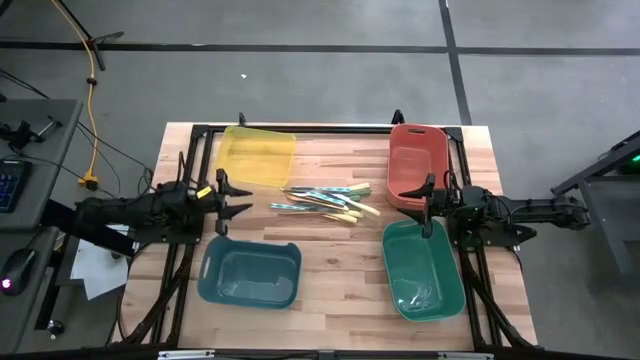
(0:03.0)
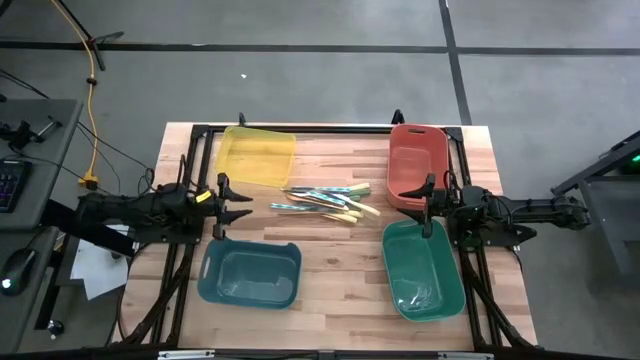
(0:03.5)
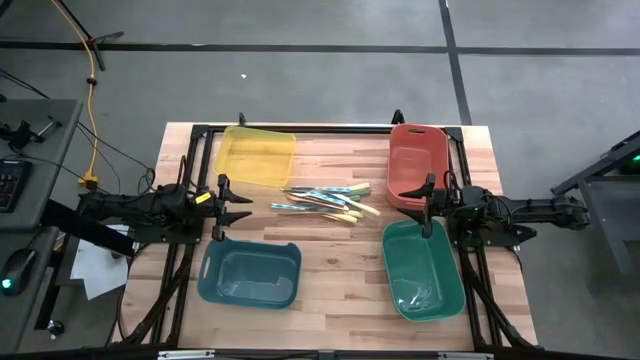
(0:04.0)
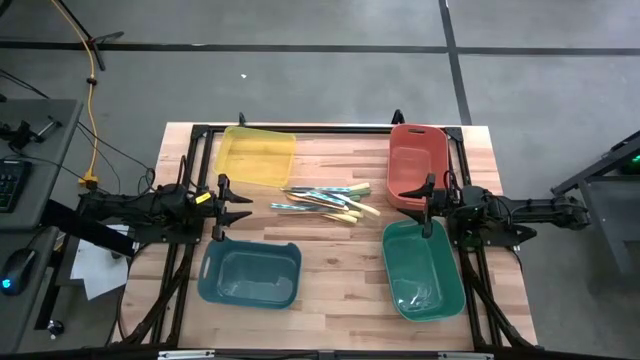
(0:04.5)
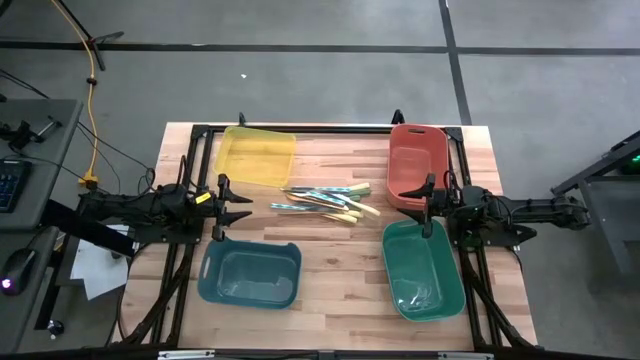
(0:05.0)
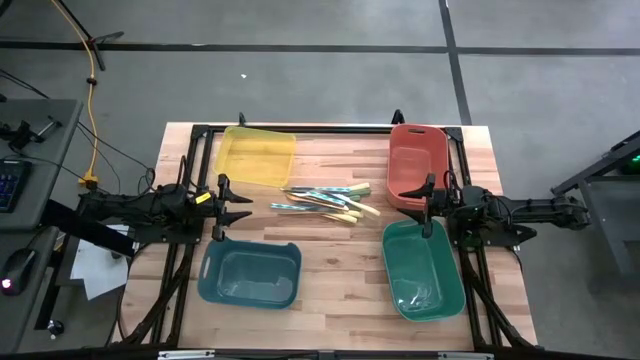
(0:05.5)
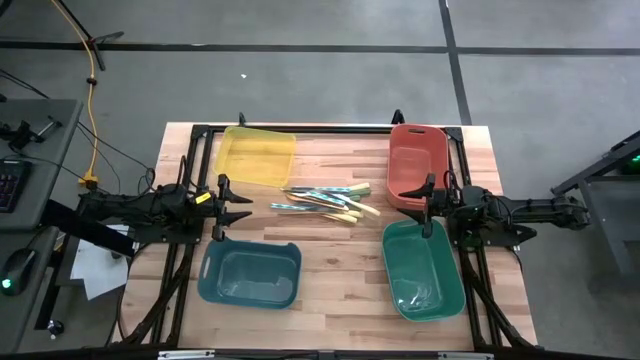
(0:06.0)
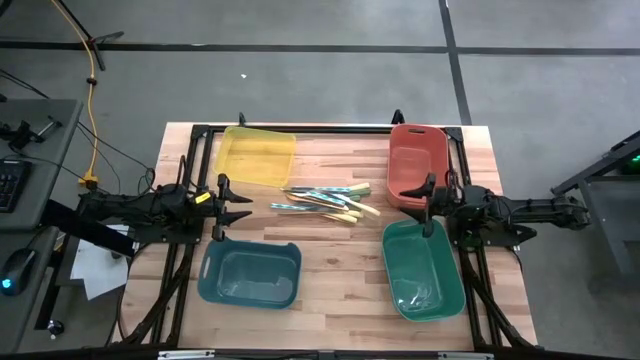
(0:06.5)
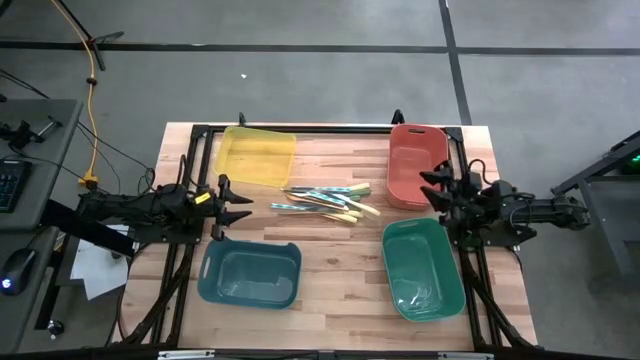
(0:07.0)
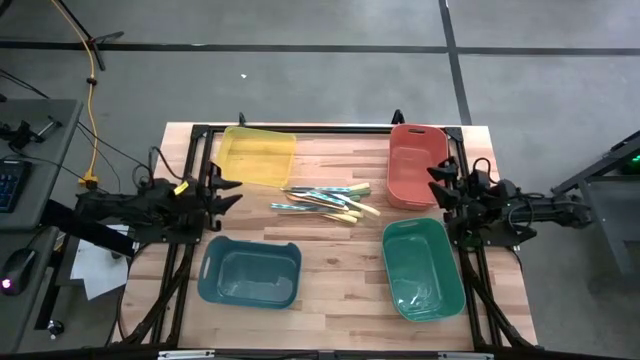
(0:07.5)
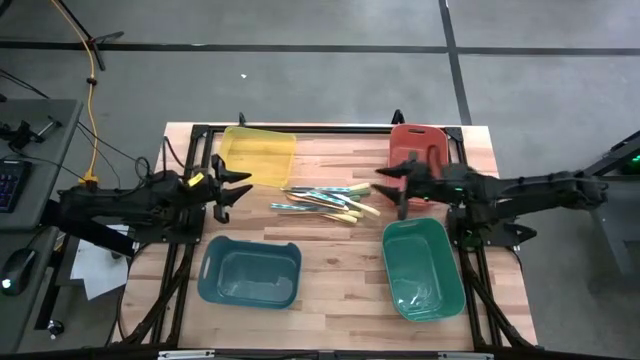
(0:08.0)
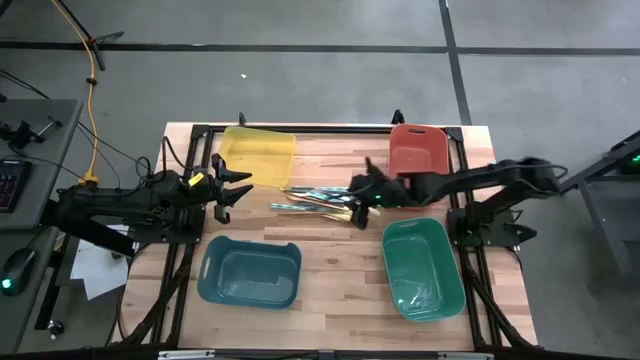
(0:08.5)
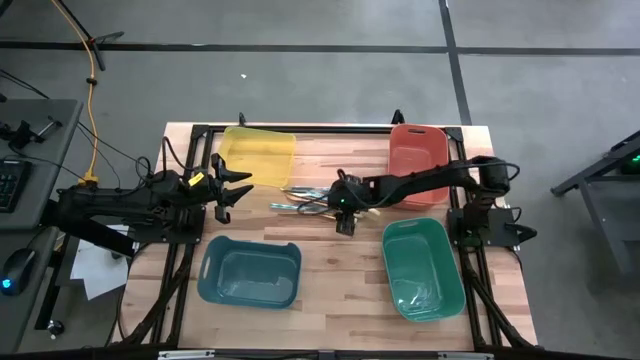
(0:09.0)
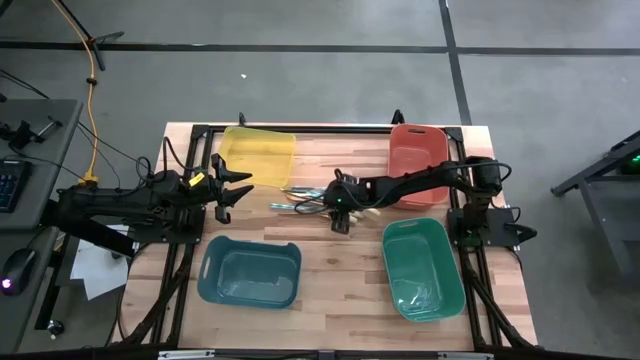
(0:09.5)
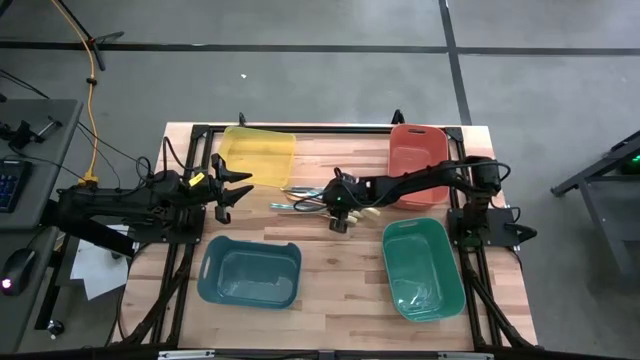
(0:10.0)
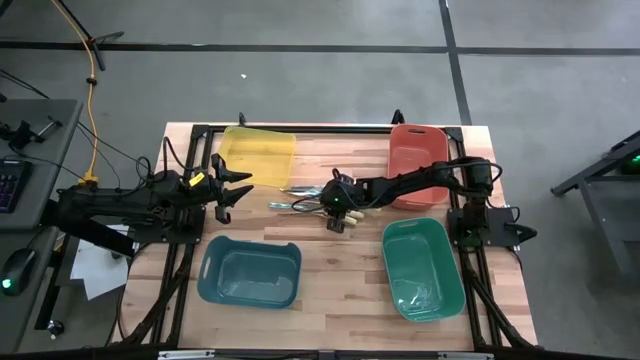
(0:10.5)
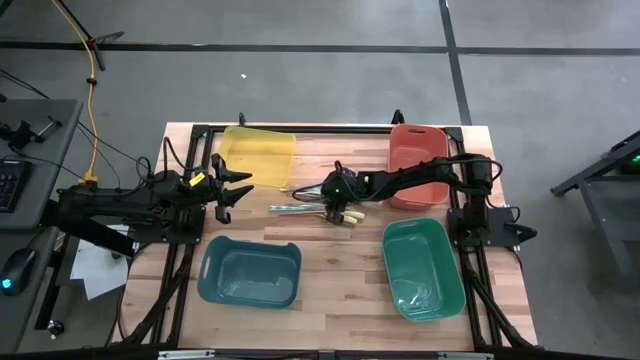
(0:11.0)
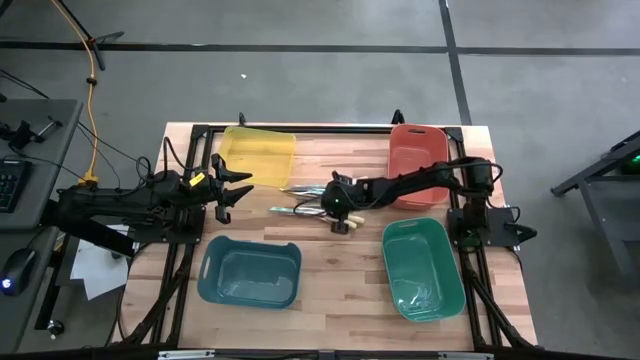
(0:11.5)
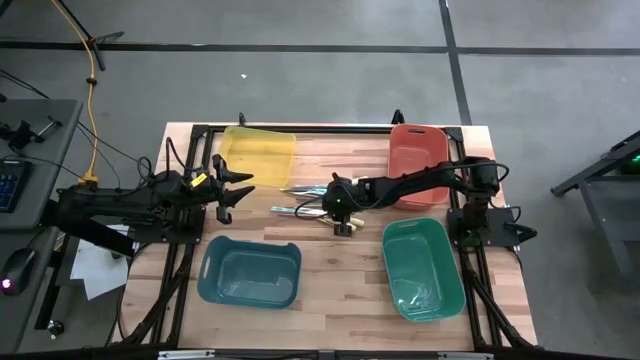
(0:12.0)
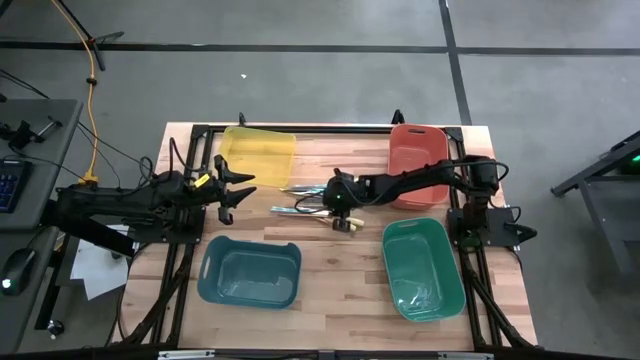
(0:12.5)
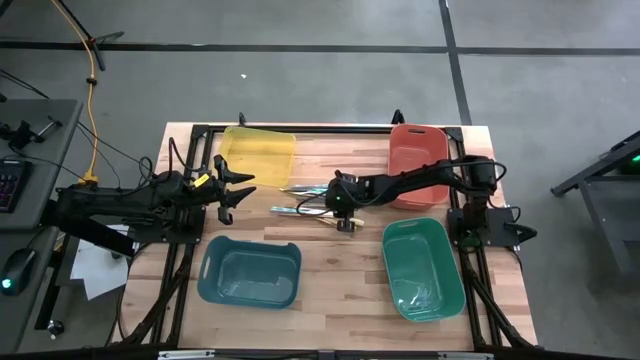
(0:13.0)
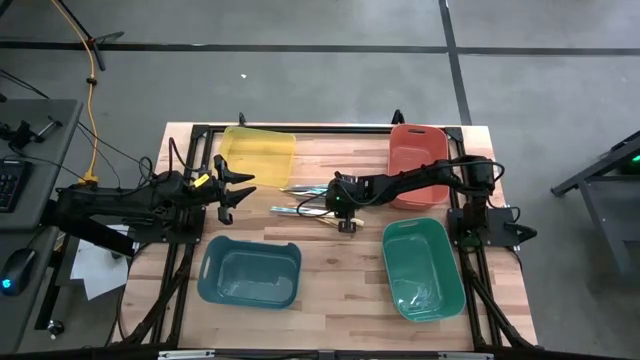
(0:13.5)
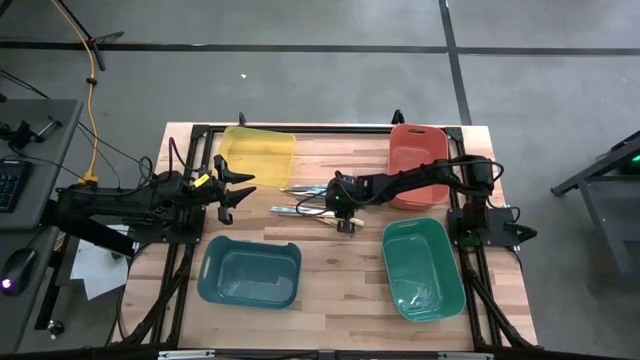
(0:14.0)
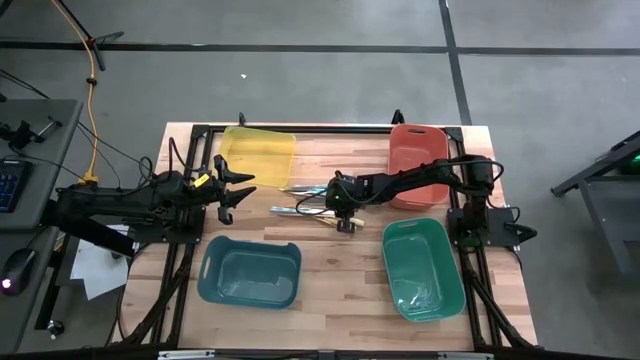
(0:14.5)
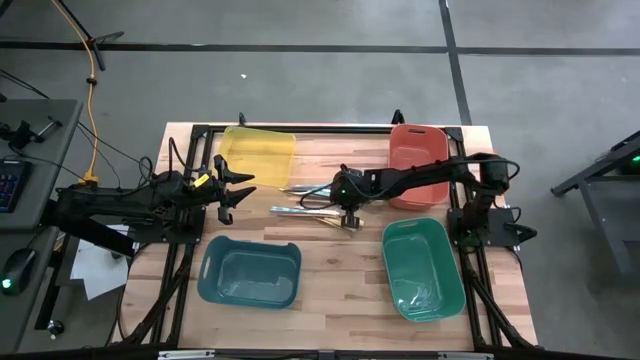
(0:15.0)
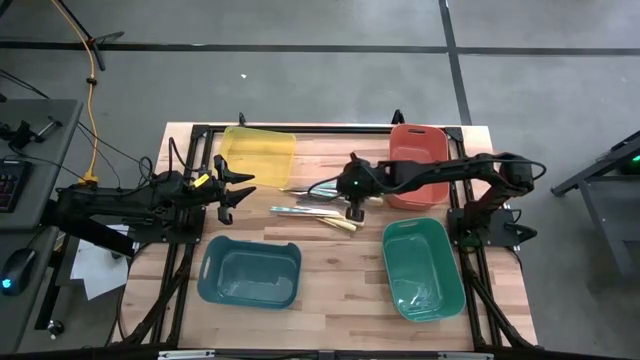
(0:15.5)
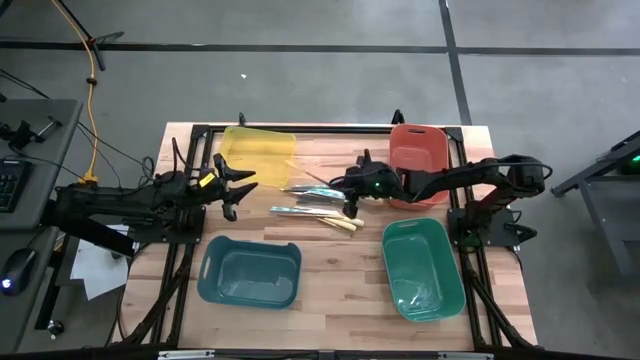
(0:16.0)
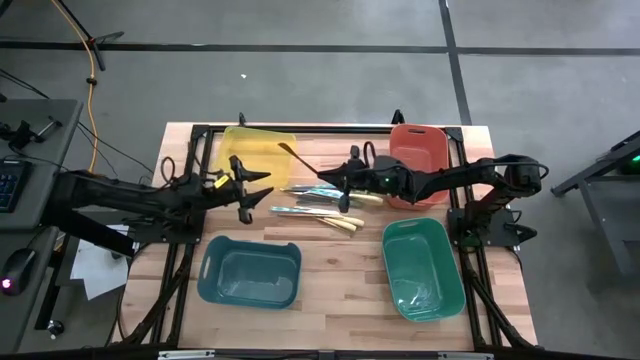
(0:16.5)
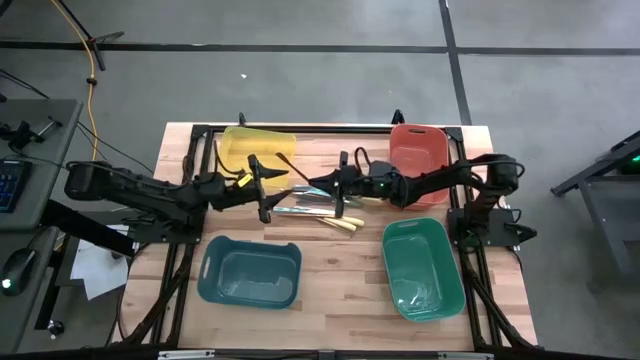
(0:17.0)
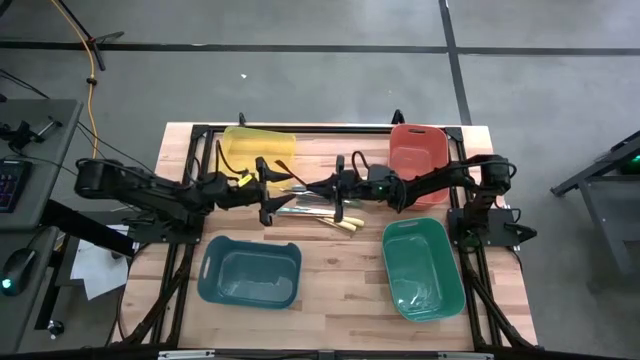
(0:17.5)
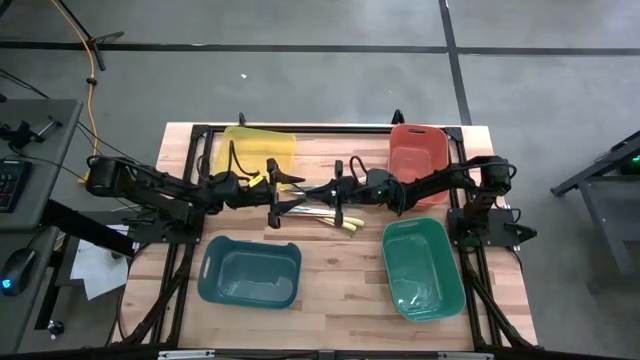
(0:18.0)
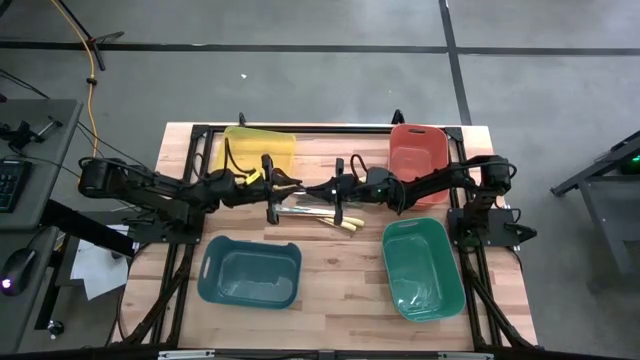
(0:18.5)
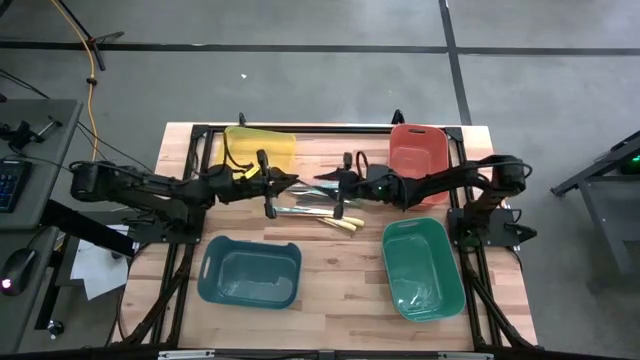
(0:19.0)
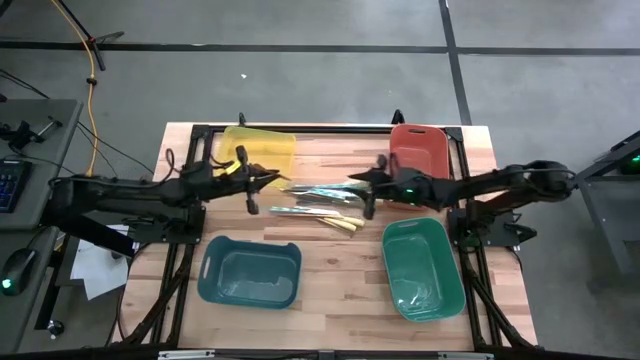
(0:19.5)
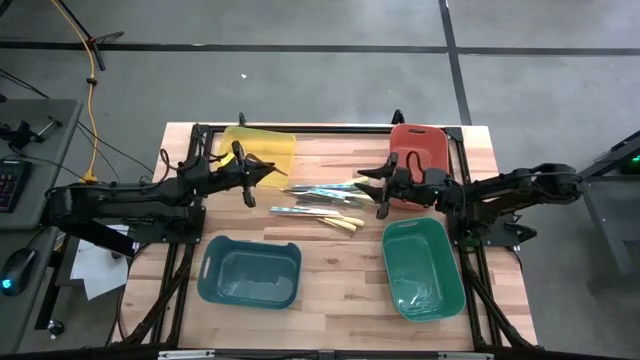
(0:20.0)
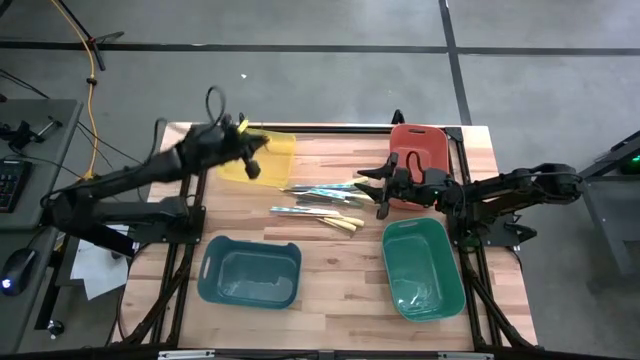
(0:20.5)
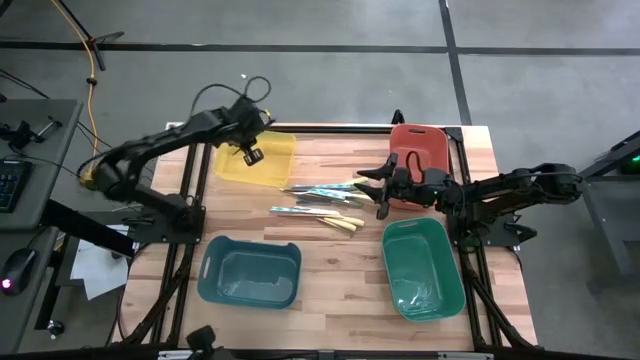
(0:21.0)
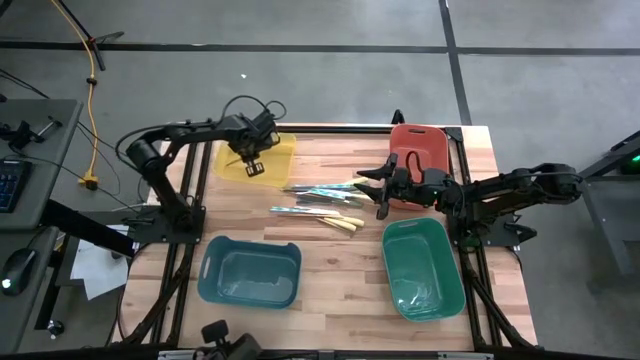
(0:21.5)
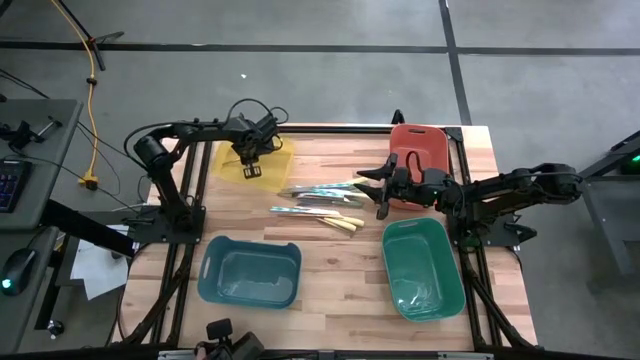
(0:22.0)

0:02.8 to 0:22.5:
Task: Sort silverware by color (type)
Put the gold knife into the yellow bin
